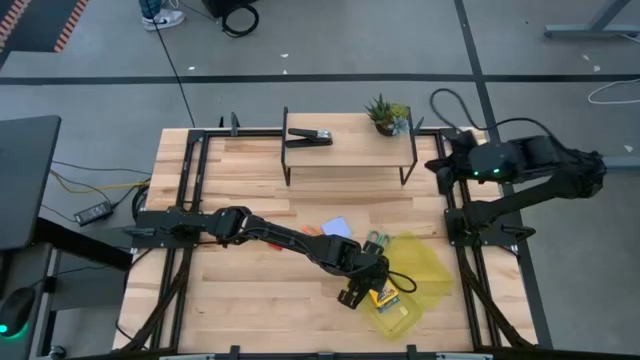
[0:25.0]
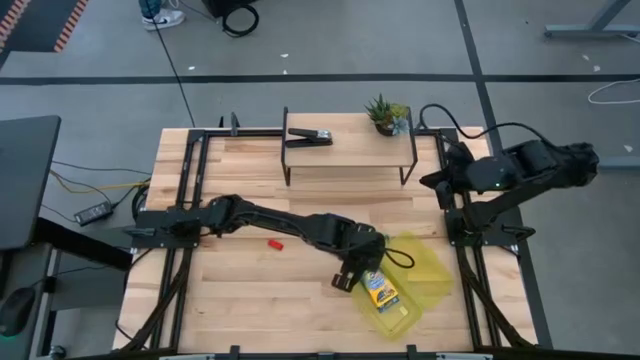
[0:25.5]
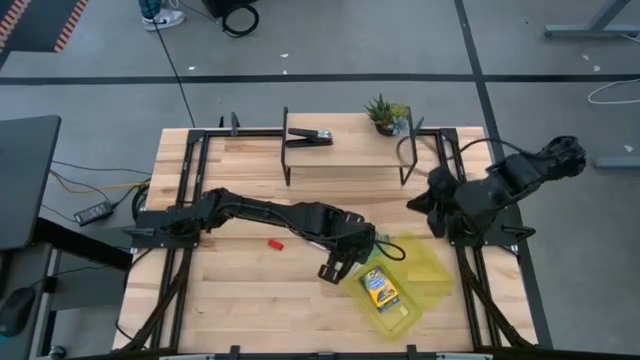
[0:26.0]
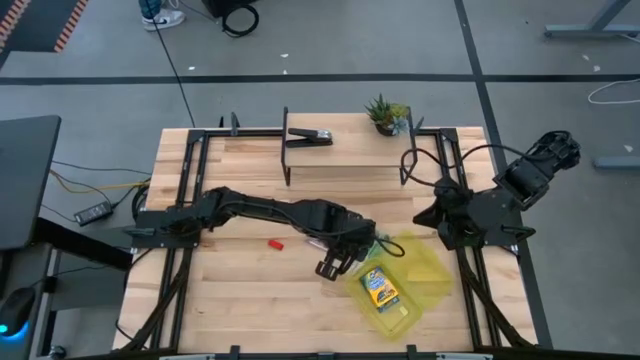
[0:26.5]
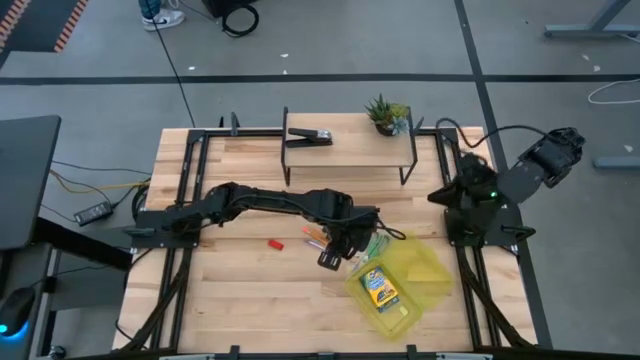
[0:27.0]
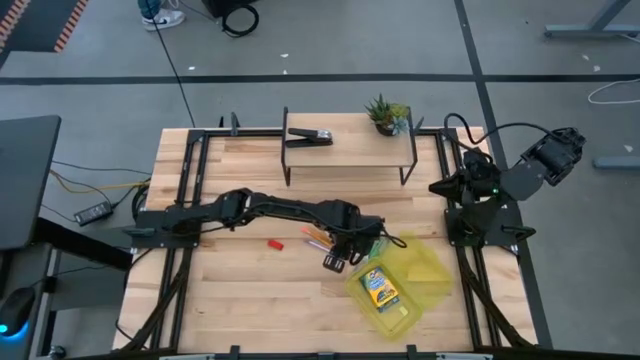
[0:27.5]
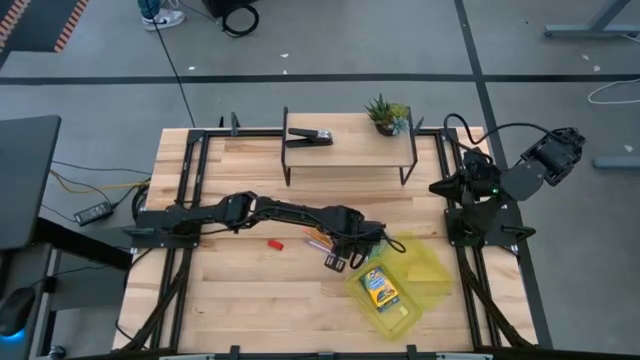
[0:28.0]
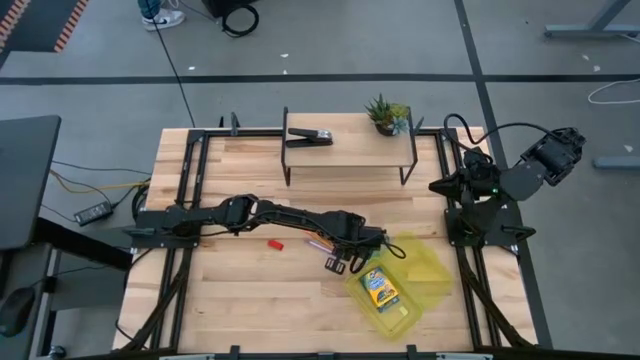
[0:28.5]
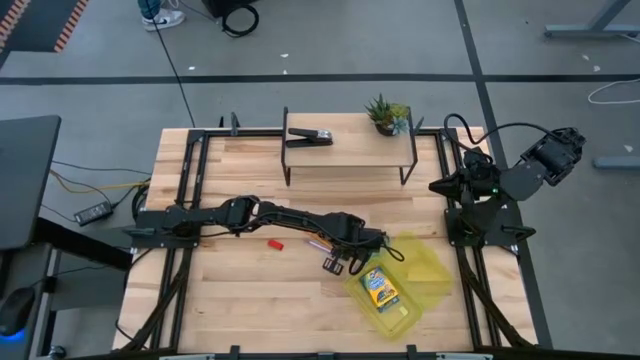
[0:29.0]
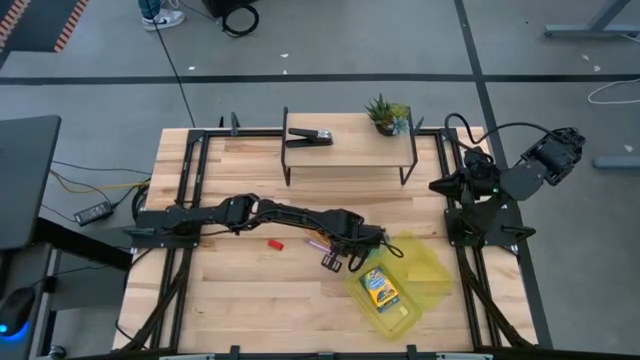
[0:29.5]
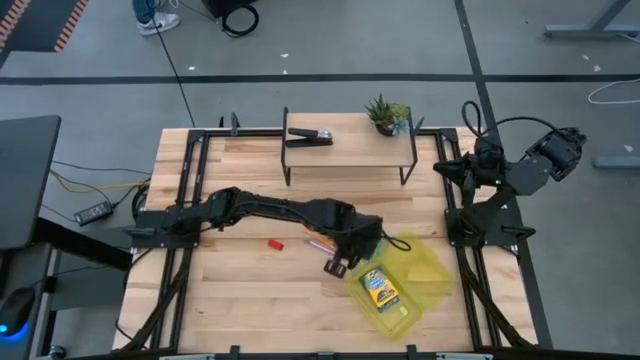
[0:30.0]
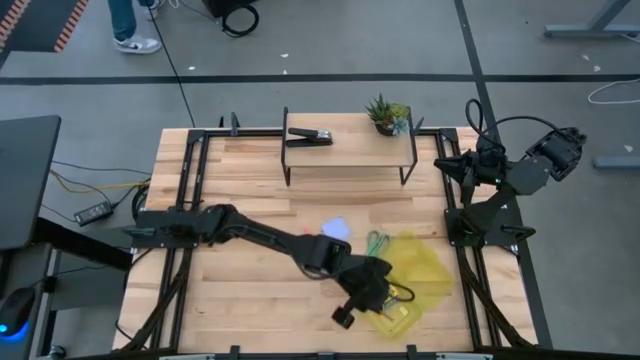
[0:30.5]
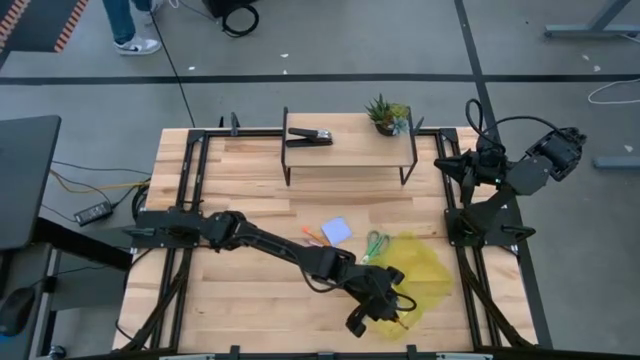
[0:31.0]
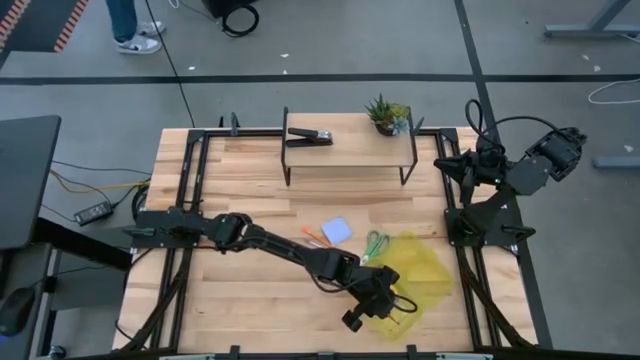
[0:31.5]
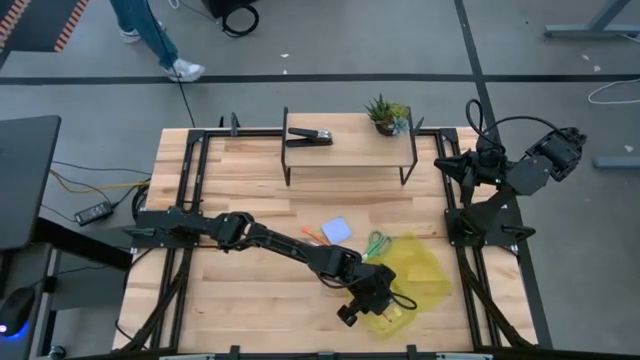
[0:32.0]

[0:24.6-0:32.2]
Task: Pack school essentials
Put the left orange pencil into the yellow supply box

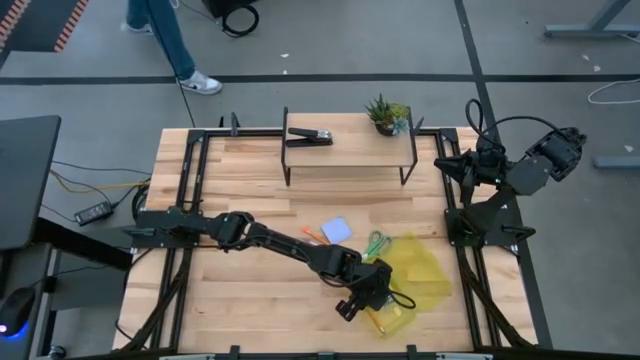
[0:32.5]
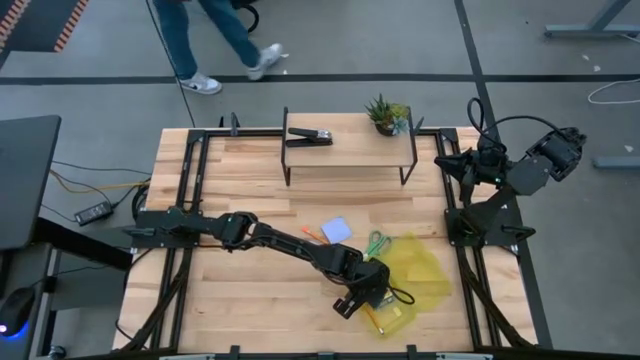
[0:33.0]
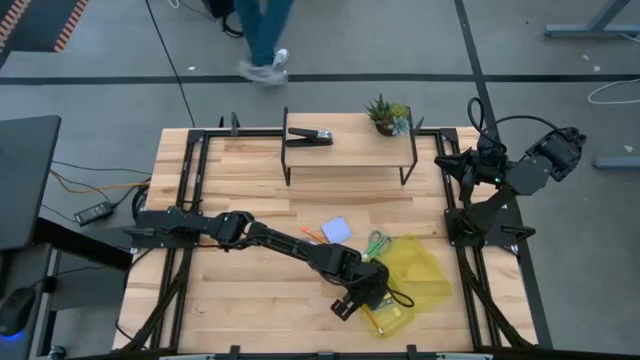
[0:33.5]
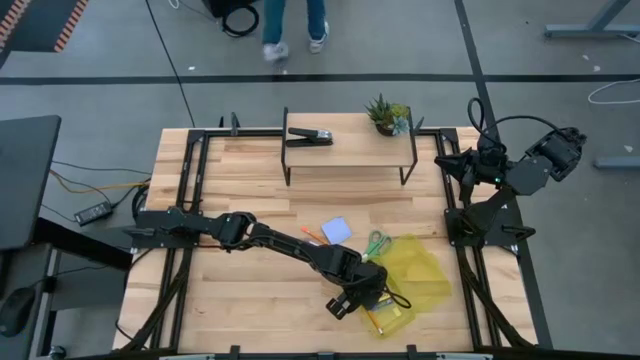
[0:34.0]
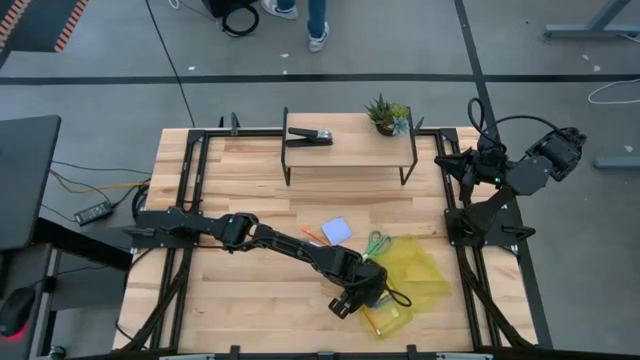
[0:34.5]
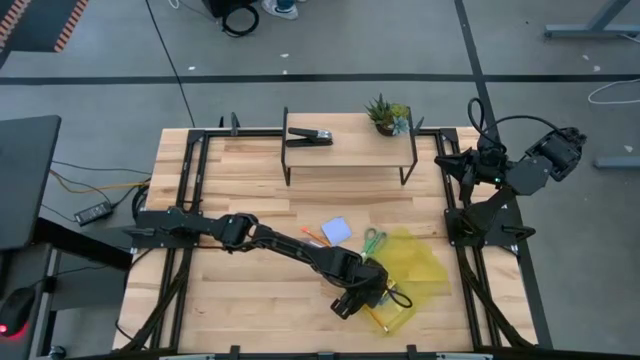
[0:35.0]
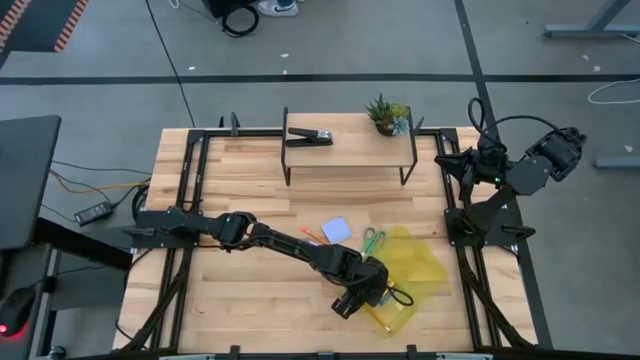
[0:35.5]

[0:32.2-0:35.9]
Put the yellow pencil into the yellow supply box

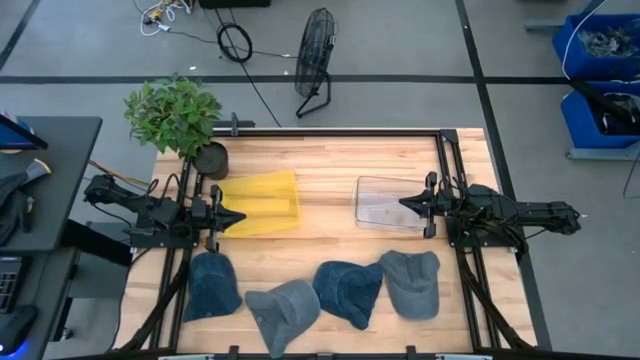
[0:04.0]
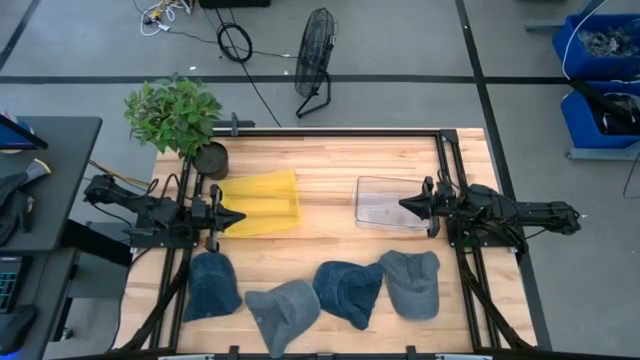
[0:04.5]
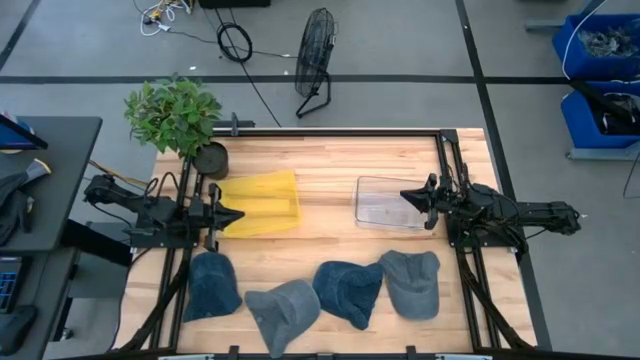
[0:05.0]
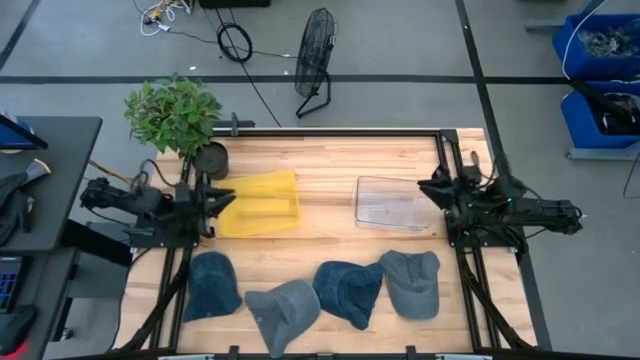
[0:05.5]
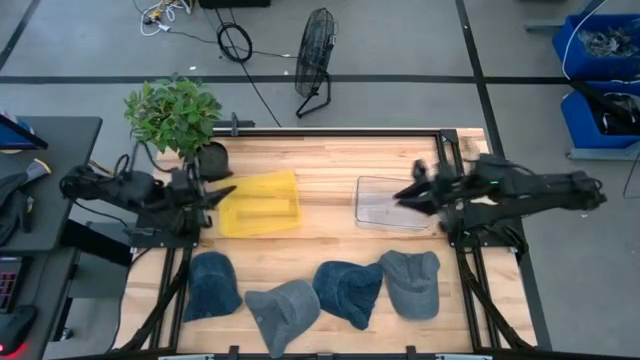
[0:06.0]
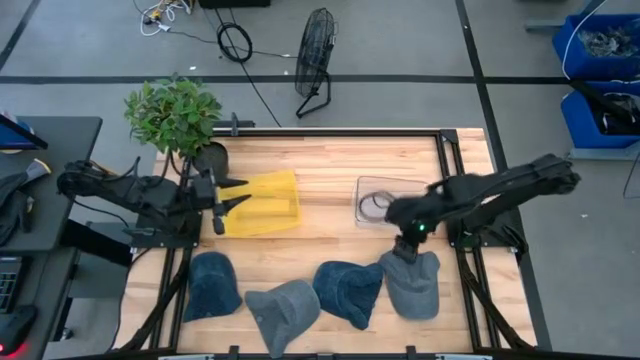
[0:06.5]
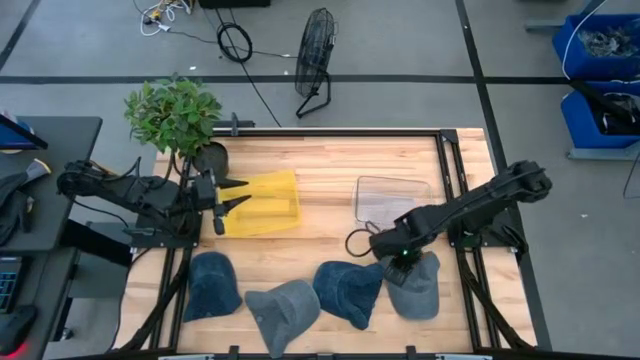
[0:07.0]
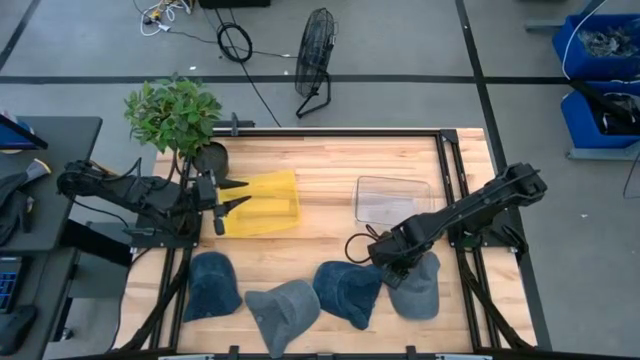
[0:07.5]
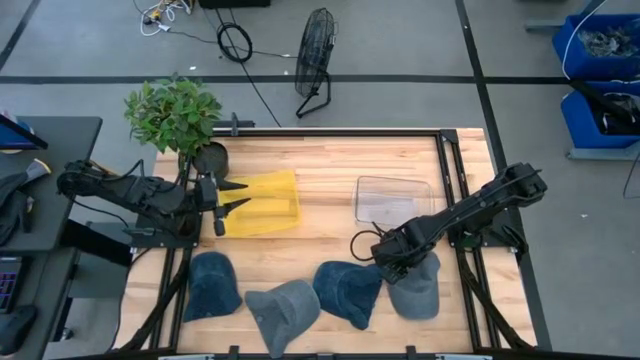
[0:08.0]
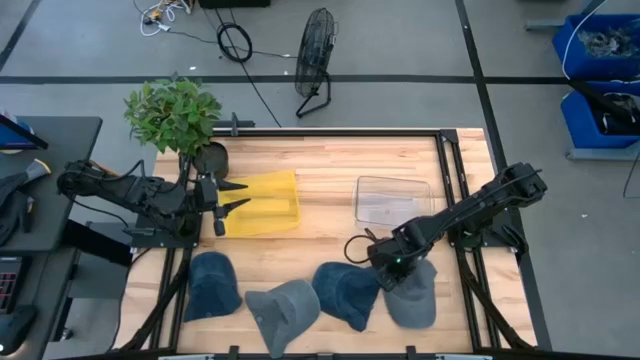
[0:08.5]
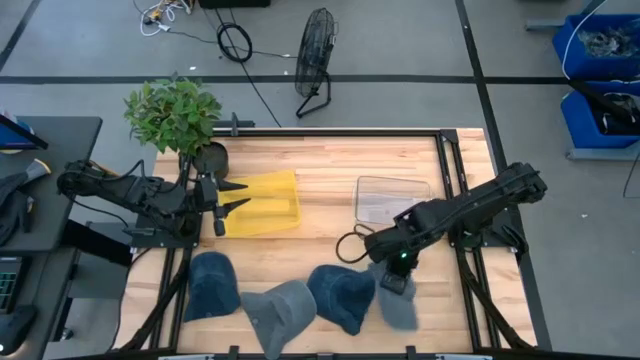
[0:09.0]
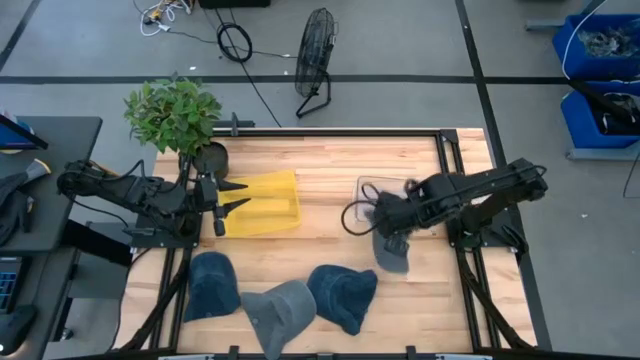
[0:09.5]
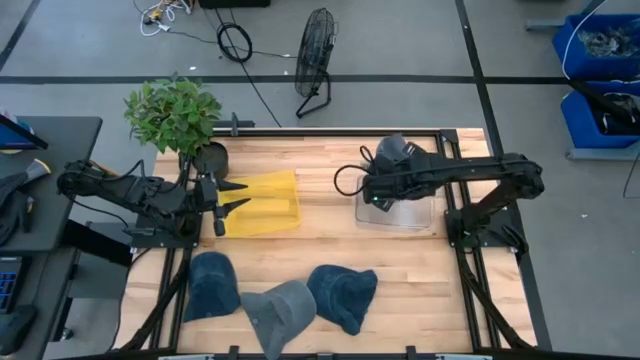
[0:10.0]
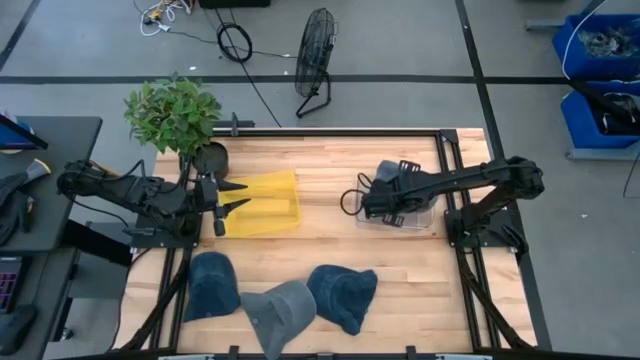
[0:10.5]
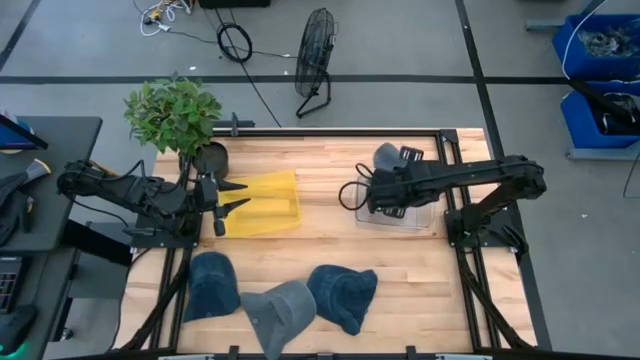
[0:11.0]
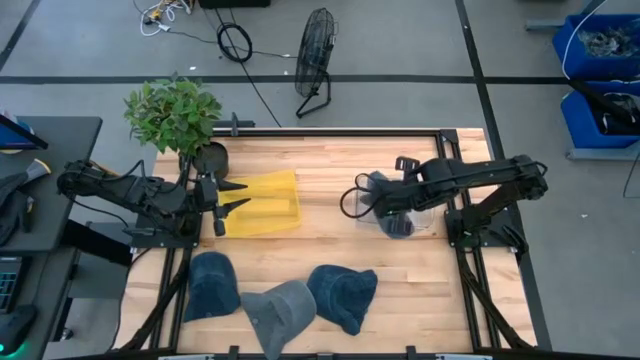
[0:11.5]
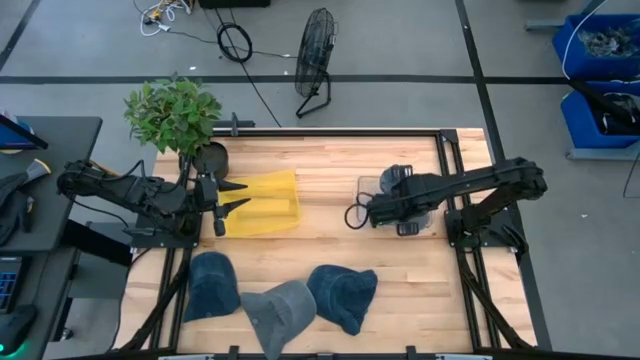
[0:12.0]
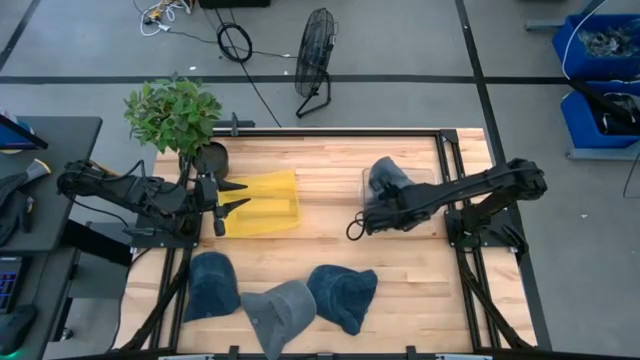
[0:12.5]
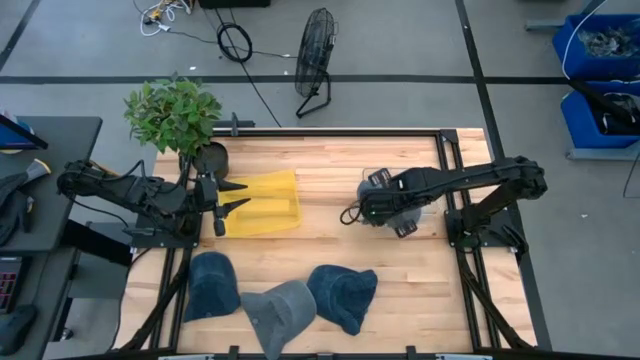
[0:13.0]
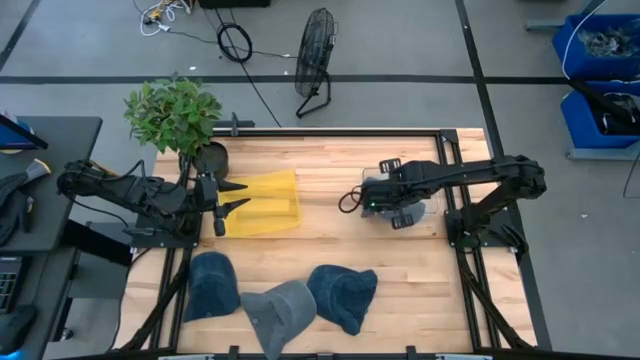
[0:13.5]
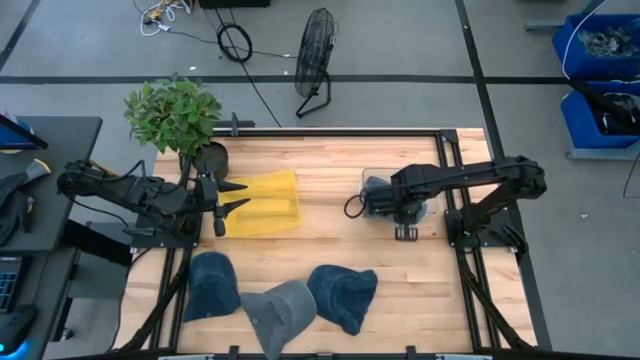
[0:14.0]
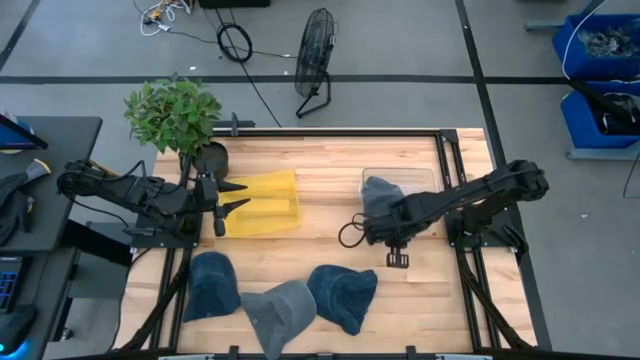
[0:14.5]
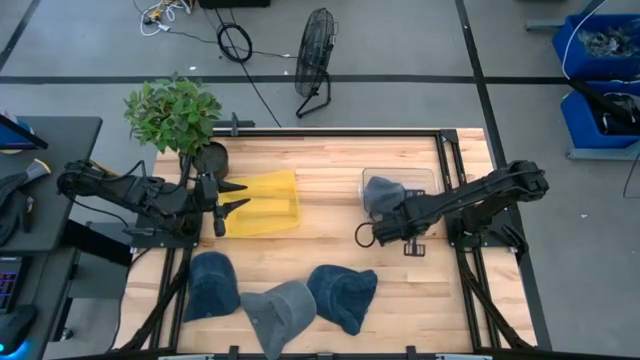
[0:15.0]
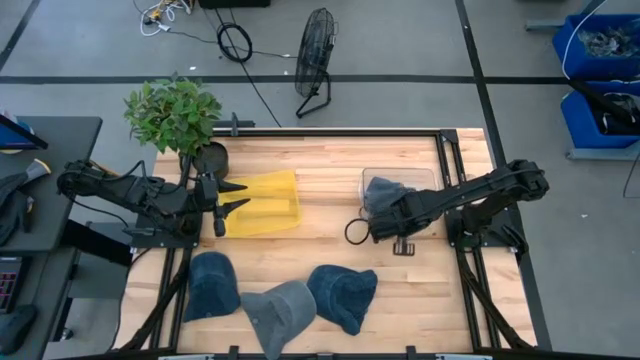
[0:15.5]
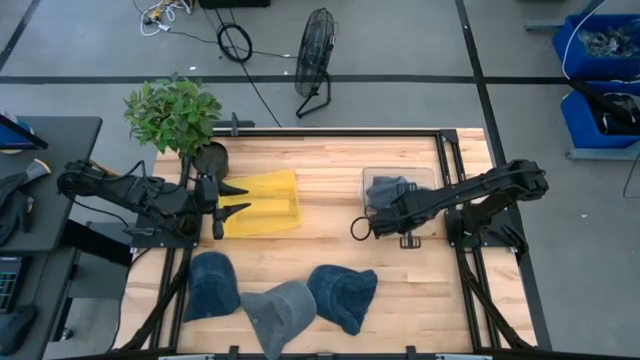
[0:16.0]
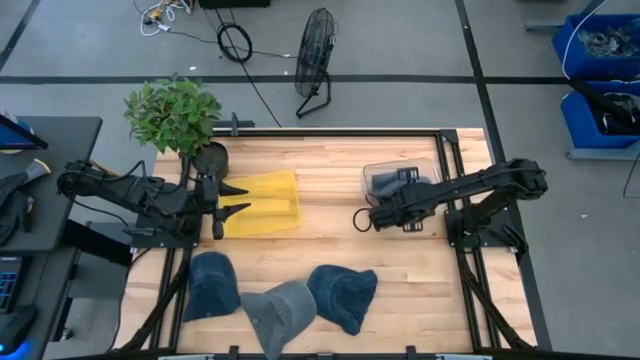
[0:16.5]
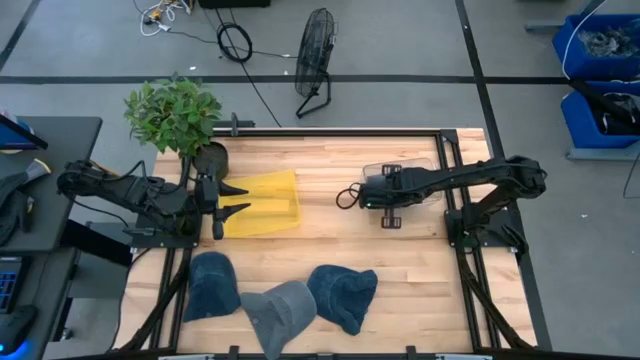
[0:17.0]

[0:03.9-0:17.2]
Task: Pick & Place hat
Put the right gray cap into the transparent bin
